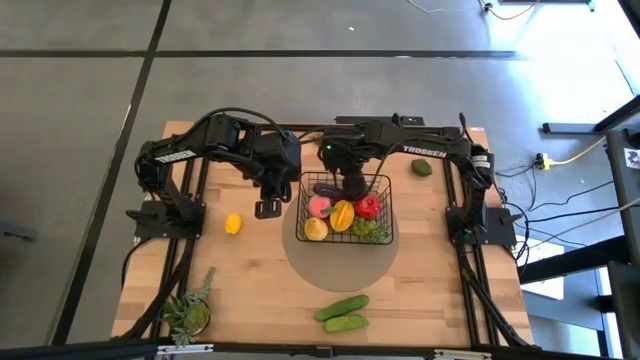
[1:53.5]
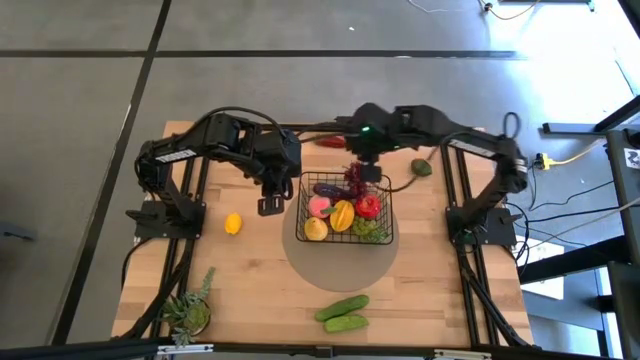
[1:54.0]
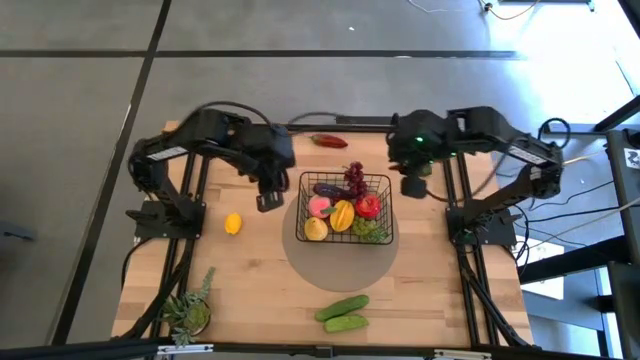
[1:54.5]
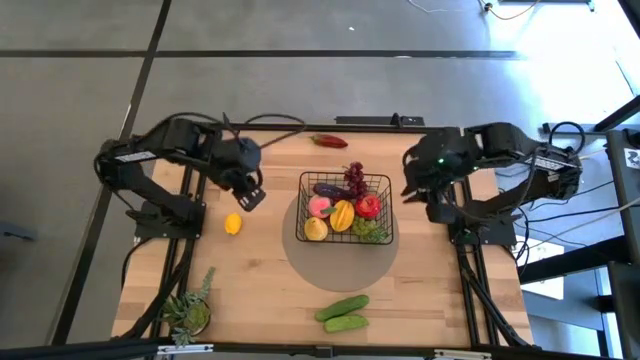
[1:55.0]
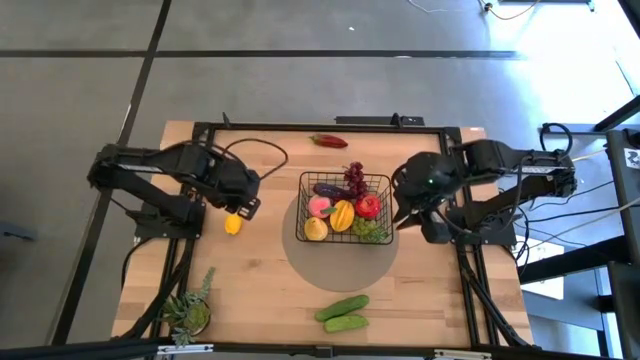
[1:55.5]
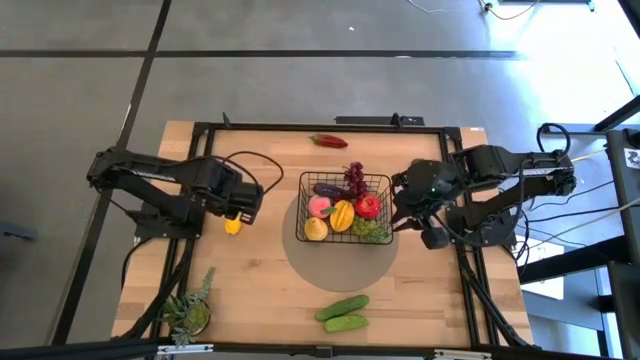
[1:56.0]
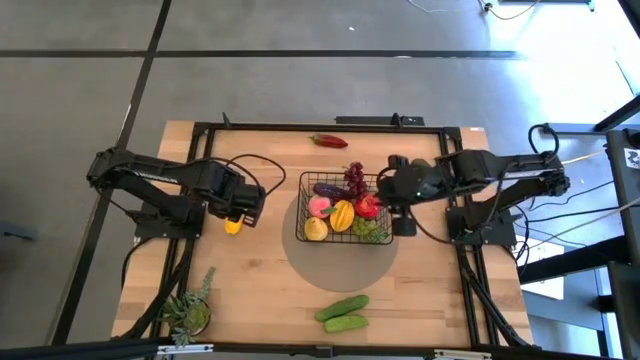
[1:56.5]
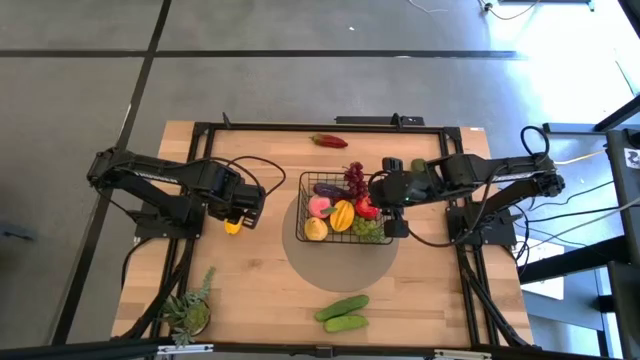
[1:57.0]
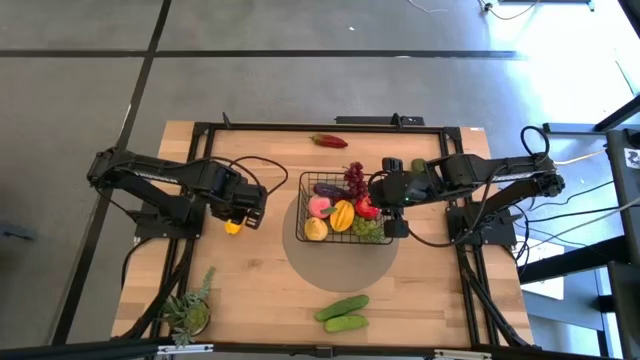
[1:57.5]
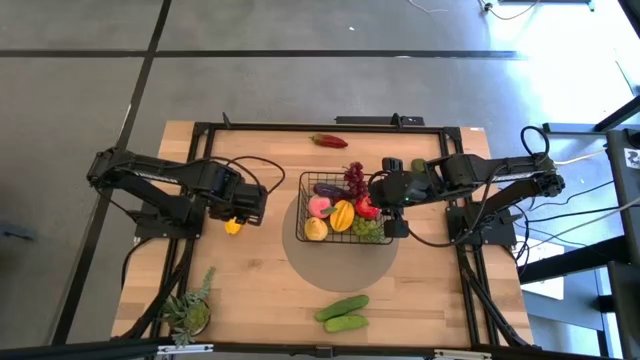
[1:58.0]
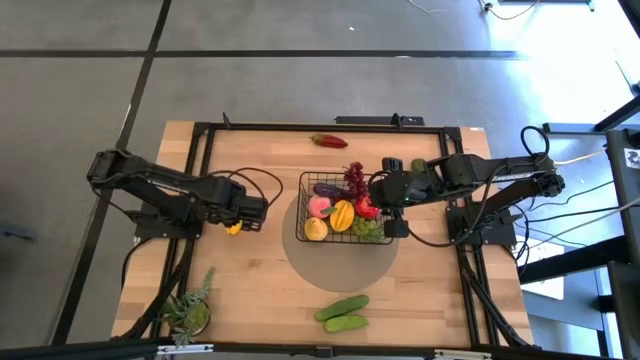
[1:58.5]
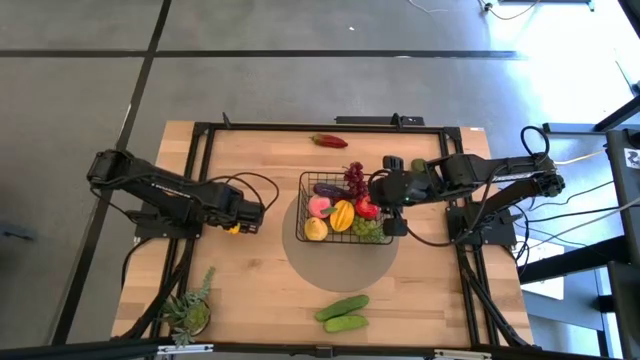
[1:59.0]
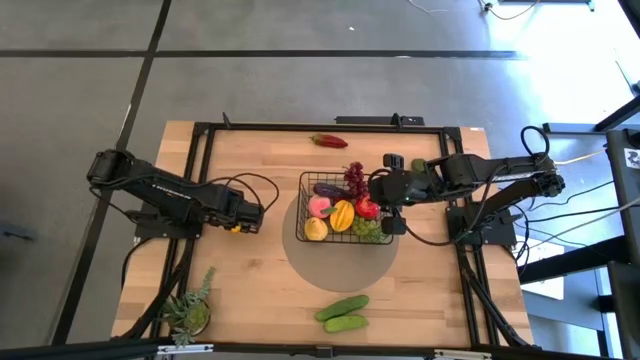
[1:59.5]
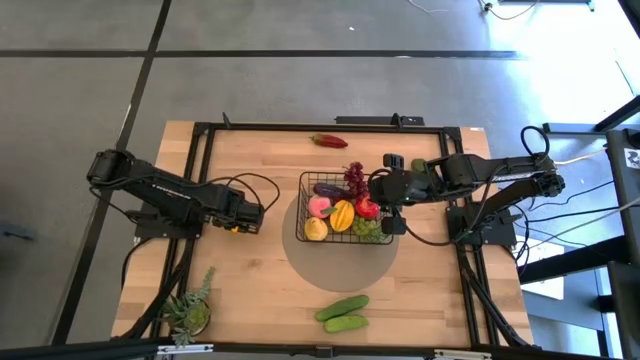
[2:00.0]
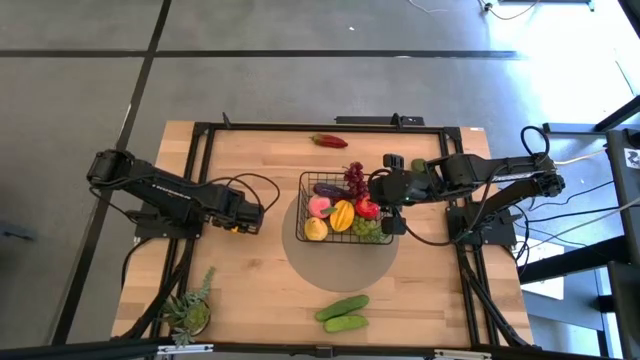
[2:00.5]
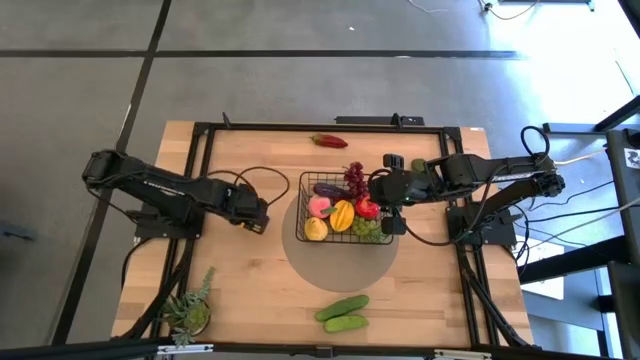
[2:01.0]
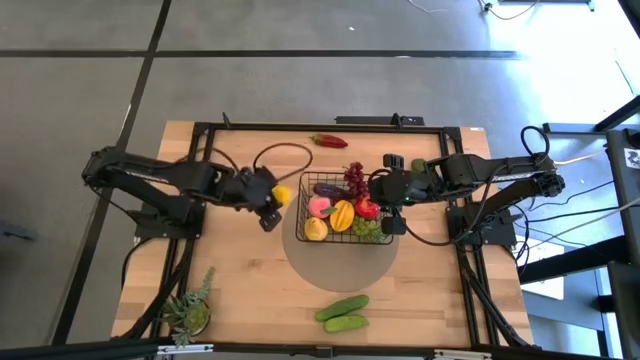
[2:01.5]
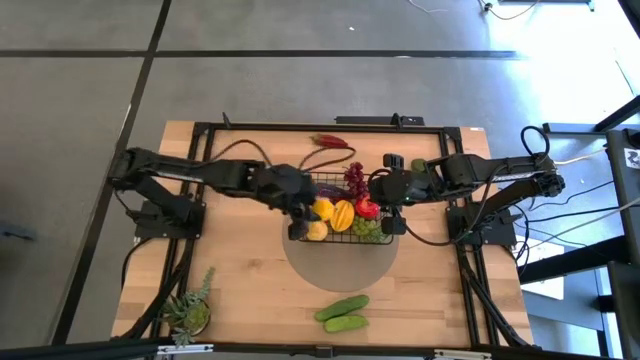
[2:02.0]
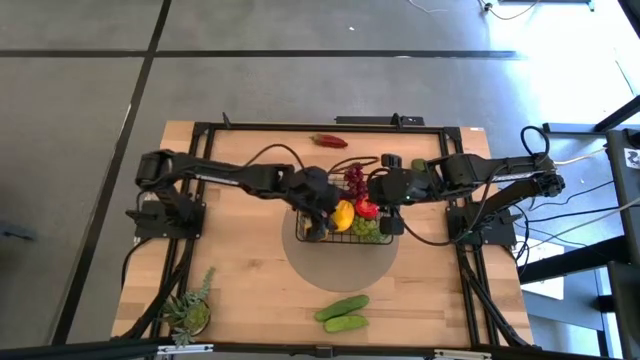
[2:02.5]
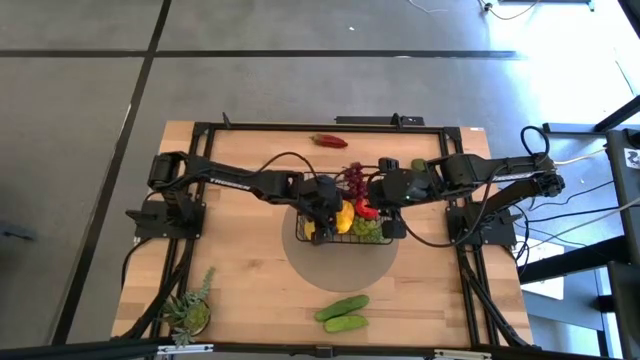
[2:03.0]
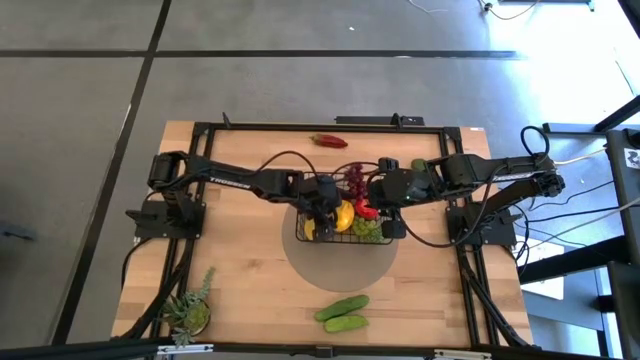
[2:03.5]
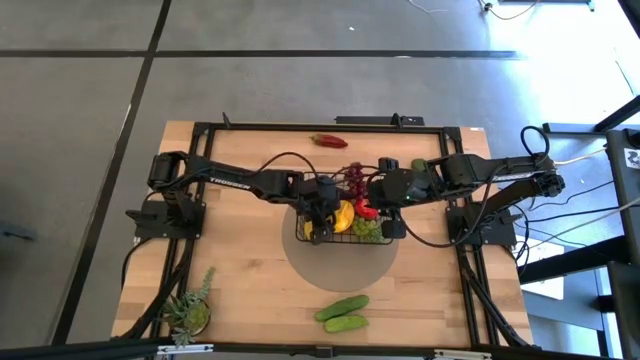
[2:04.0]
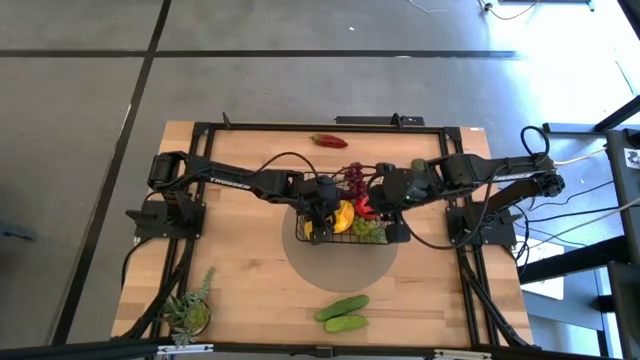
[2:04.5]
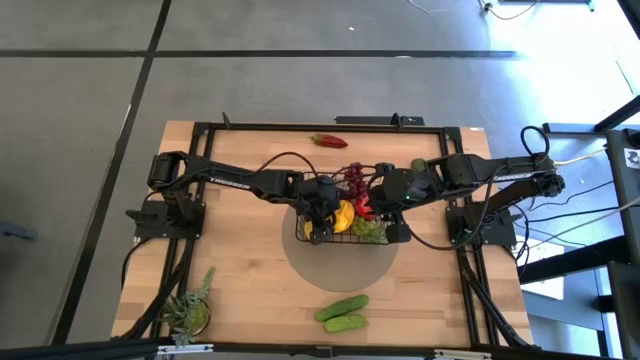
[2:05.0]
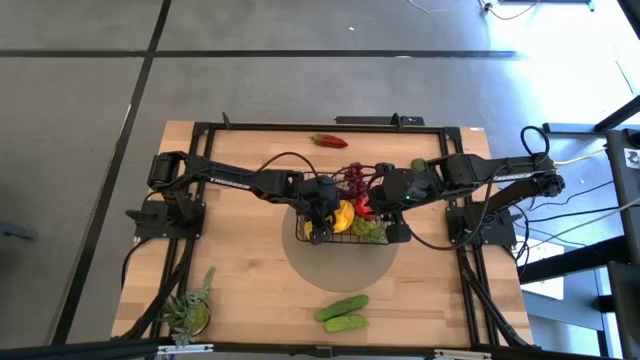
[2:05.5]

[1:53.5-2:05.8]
Task: Build produce basket
Put the yellow lemon into the black wire basket

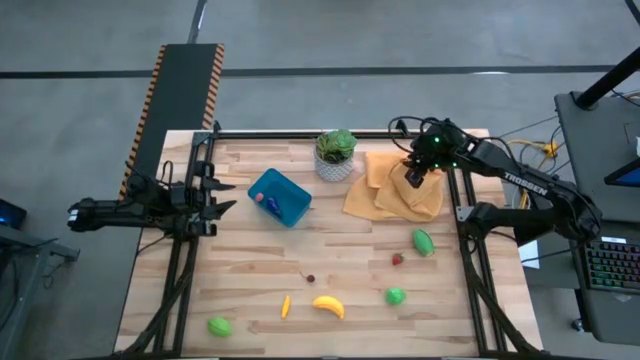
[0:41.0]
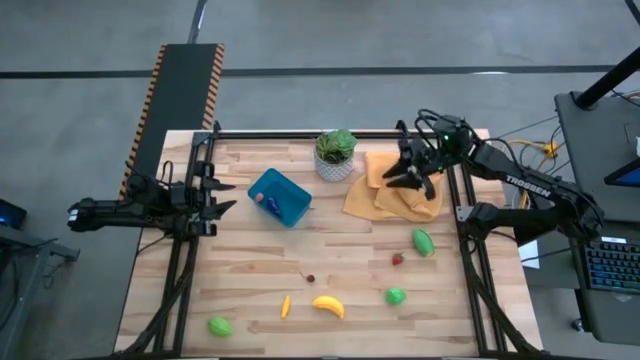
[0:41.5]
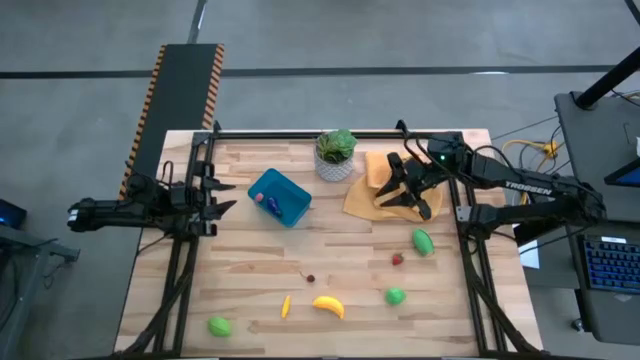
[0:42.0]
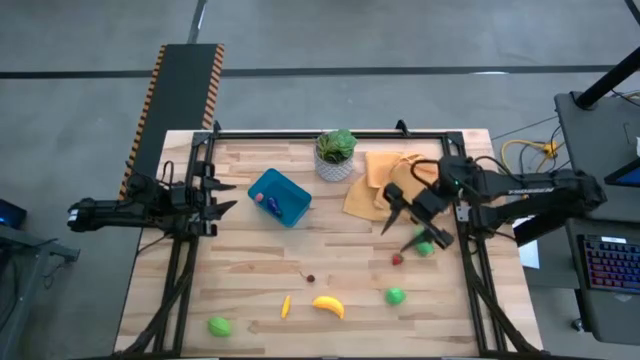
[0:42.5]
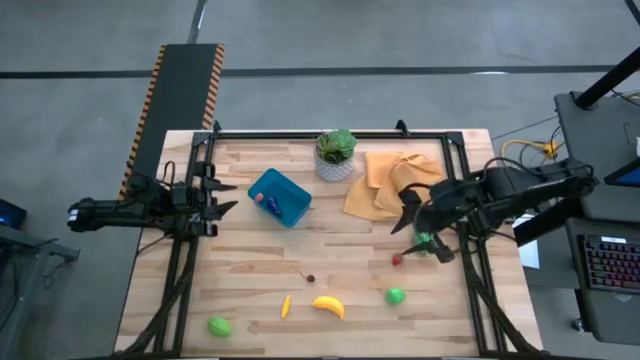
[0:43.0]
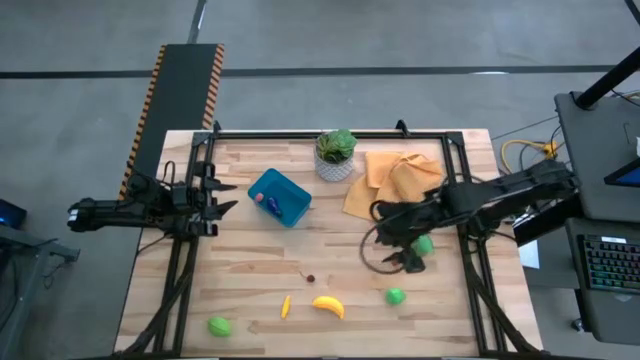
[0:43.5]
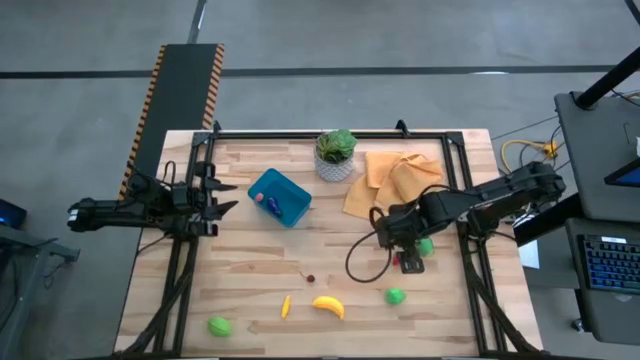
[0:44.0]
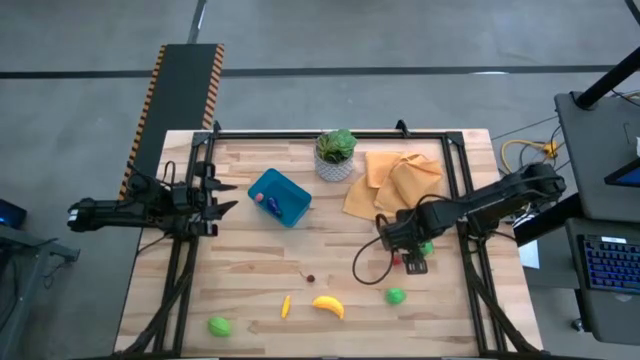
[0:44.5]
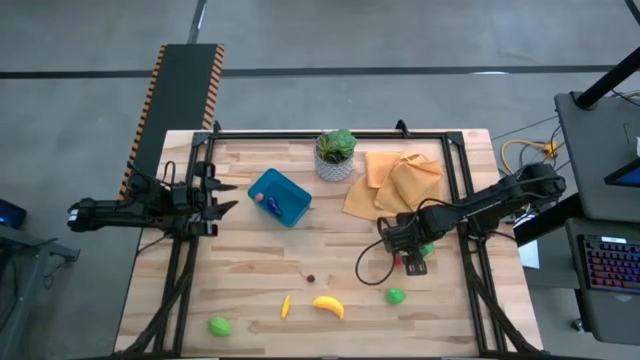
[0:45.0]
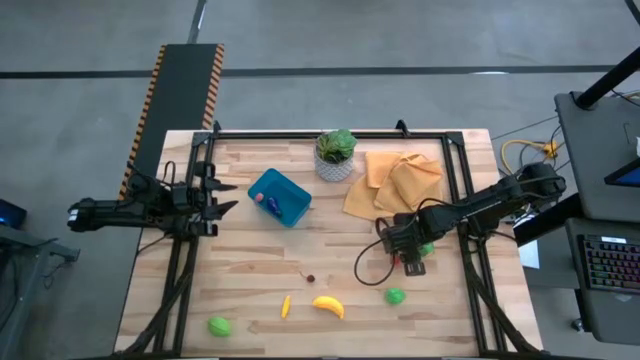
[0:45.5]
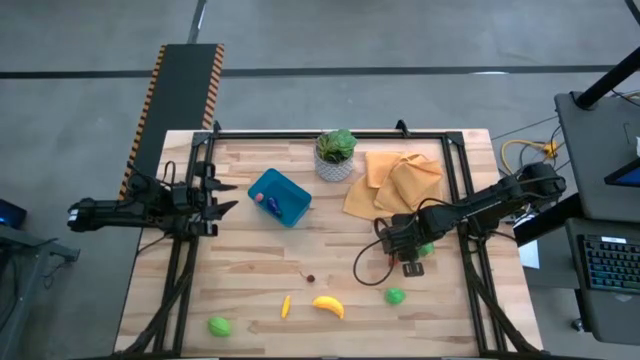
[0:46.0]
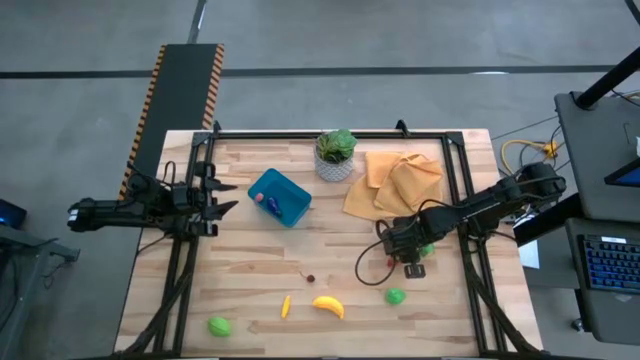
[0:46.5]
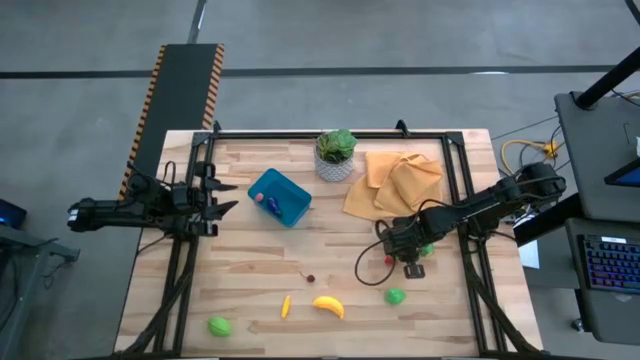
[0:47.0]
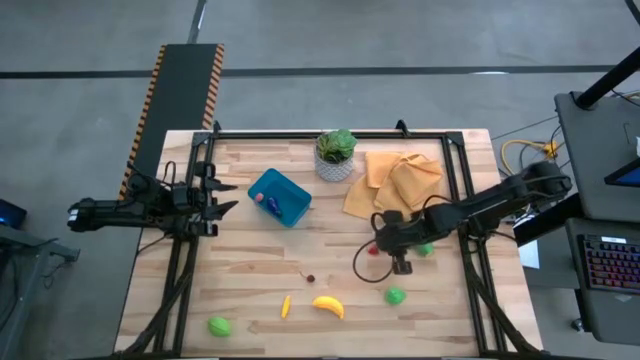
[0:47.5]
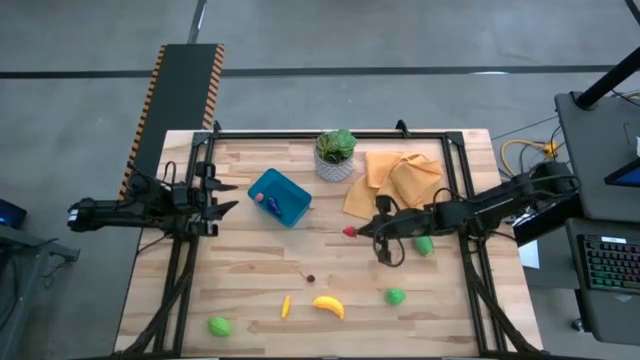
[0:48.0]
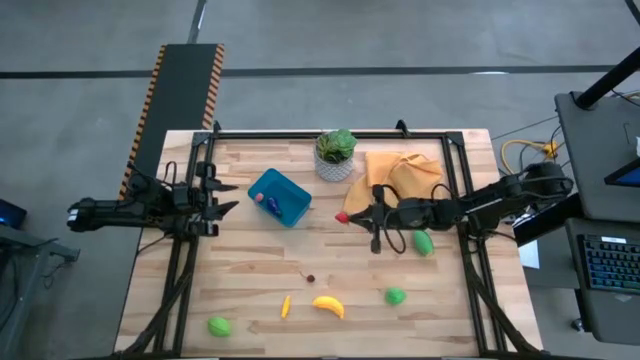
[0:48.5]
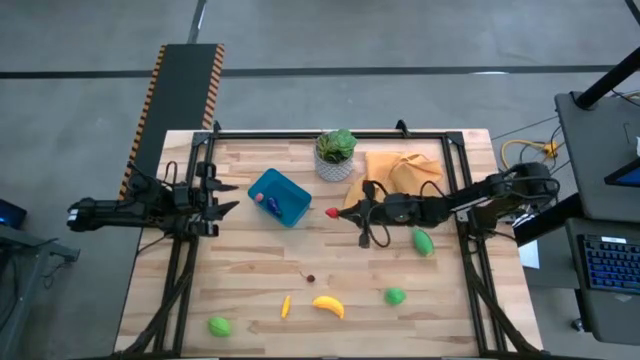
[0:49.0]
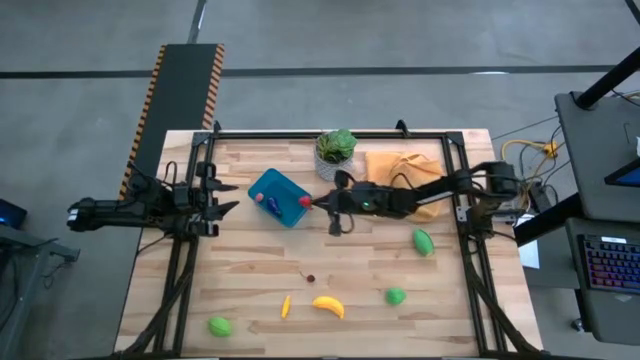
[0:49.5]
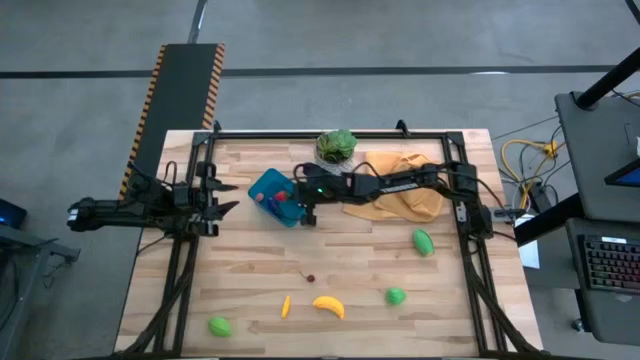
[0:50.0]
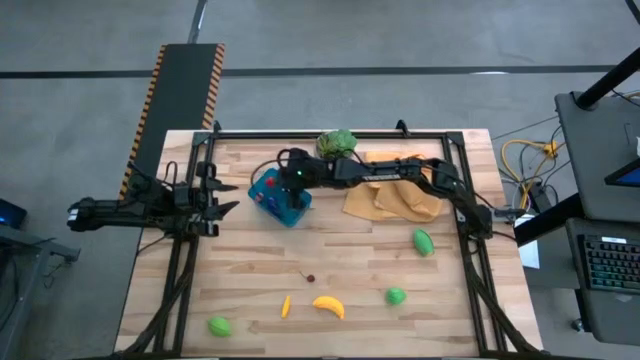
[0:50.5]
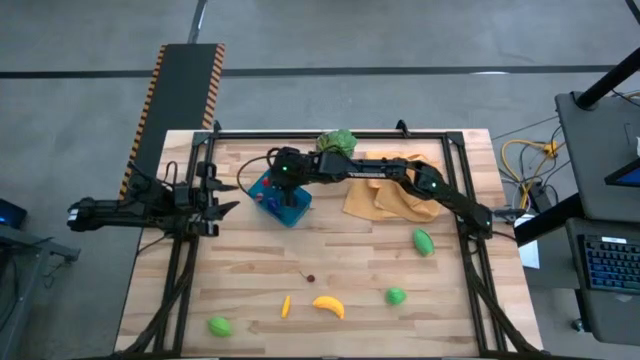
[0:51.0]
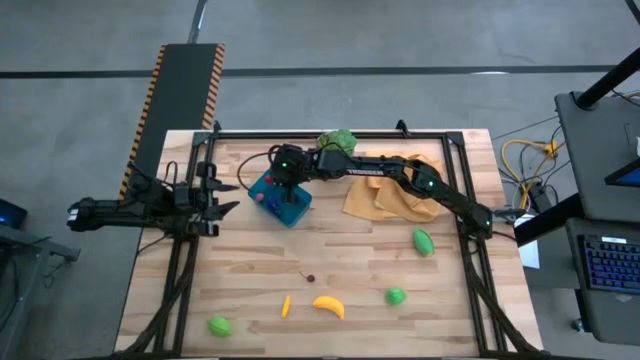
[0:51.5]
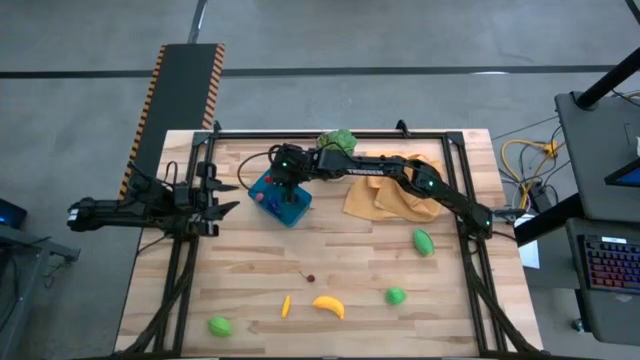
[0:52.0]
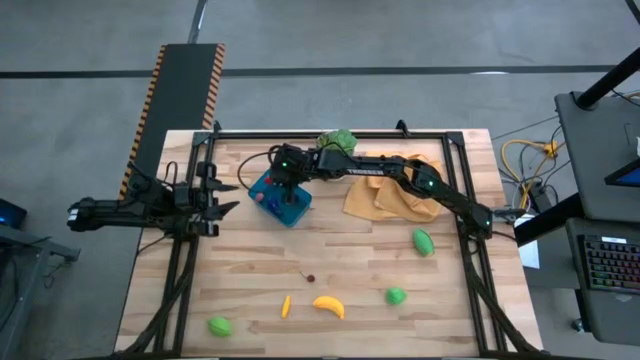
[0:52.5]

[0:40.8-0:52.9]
Task: Pick and placing Produce into tupperware
Put the red strawberry into the blue bin
